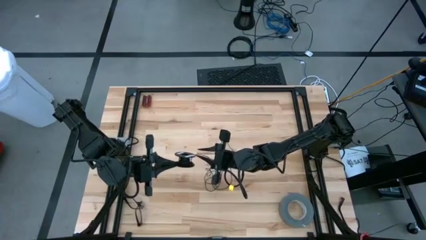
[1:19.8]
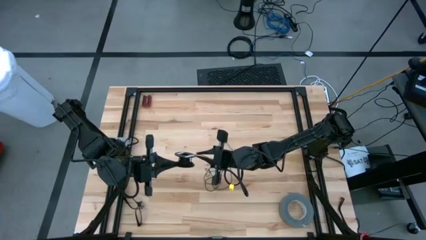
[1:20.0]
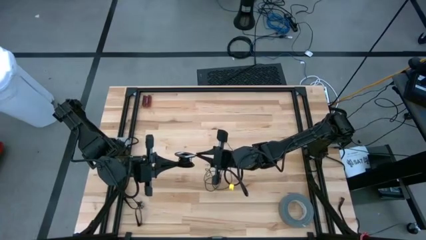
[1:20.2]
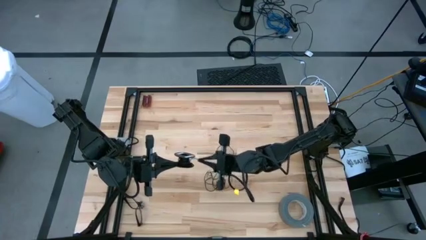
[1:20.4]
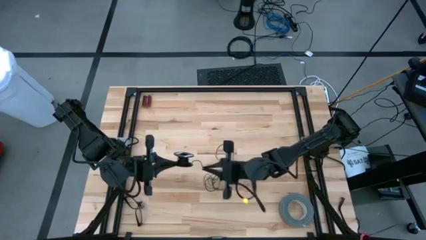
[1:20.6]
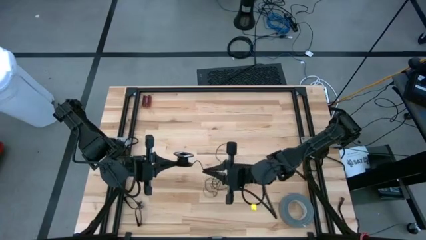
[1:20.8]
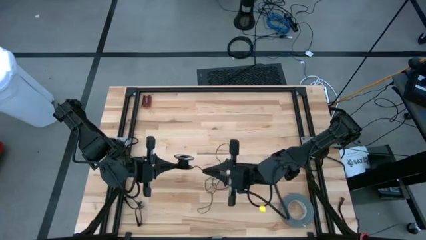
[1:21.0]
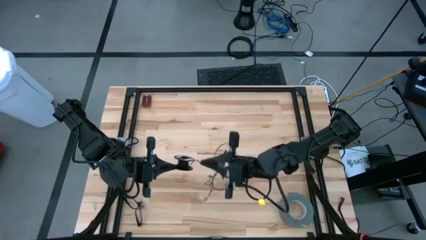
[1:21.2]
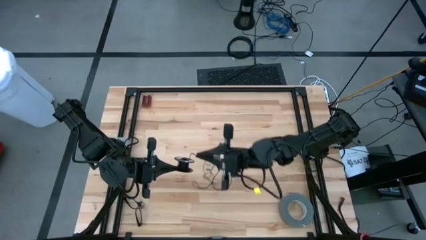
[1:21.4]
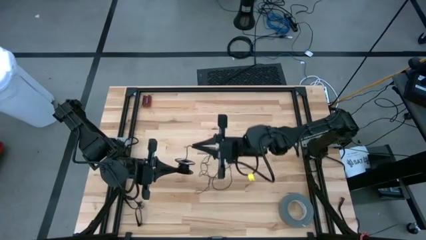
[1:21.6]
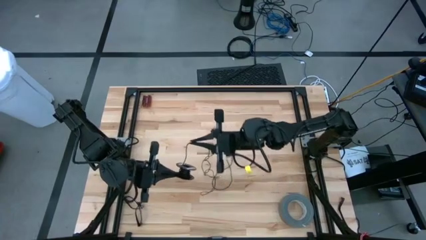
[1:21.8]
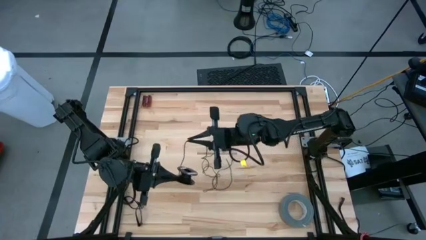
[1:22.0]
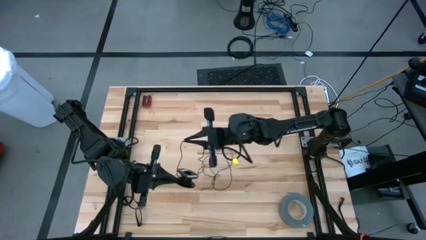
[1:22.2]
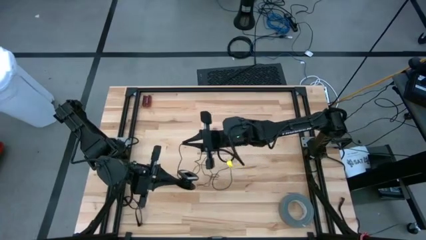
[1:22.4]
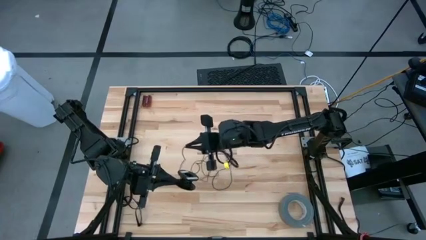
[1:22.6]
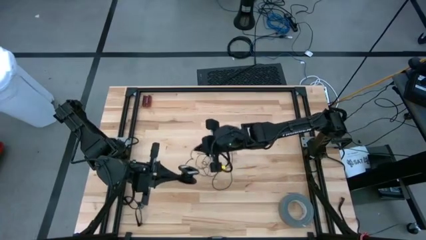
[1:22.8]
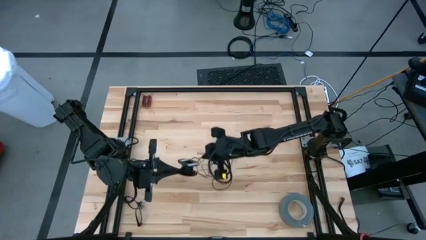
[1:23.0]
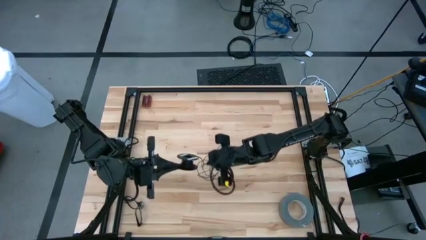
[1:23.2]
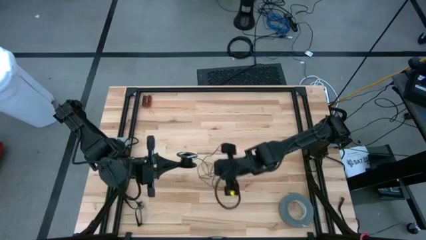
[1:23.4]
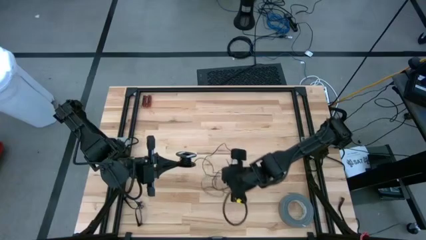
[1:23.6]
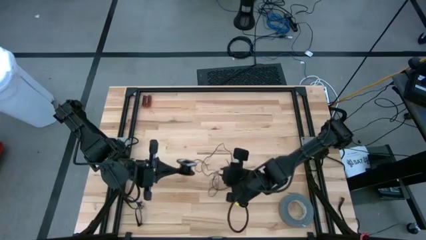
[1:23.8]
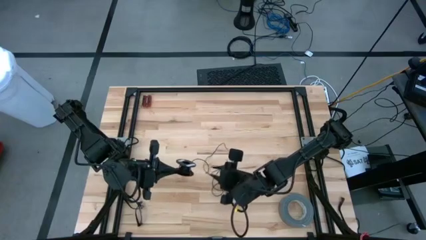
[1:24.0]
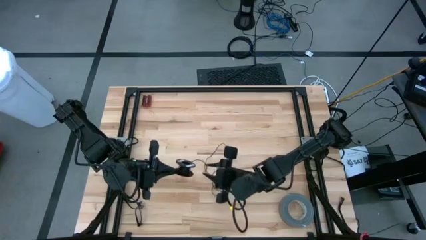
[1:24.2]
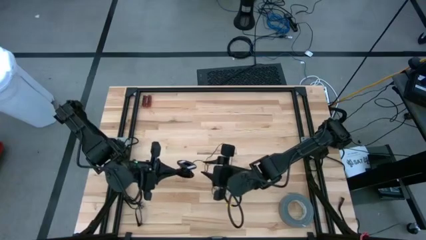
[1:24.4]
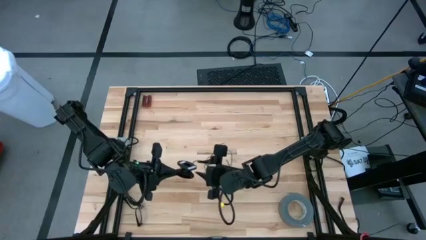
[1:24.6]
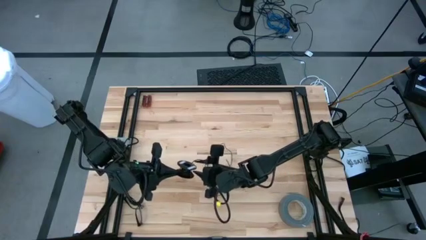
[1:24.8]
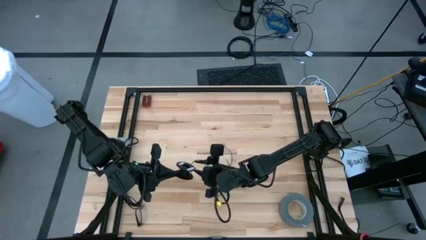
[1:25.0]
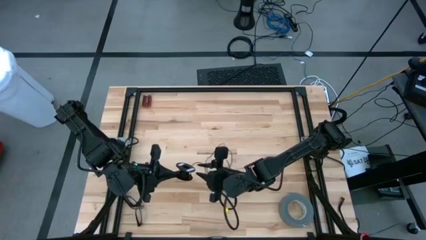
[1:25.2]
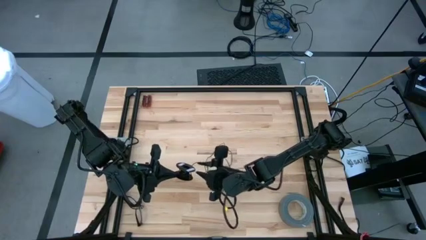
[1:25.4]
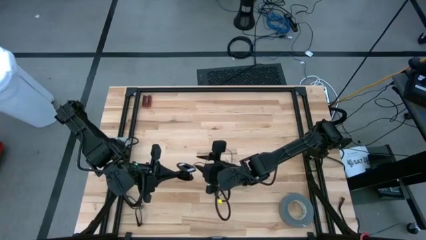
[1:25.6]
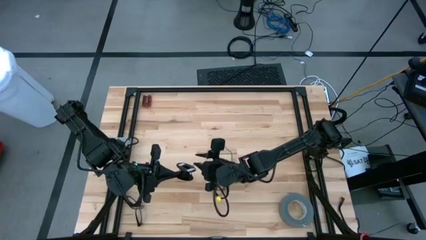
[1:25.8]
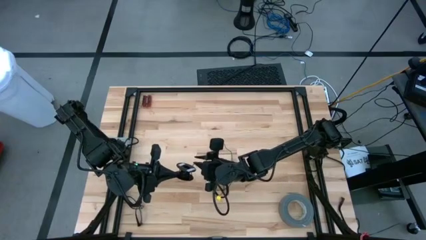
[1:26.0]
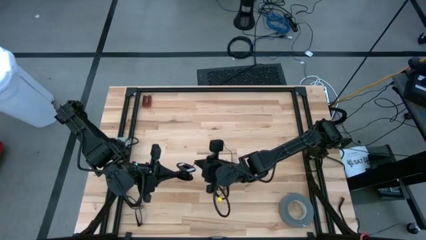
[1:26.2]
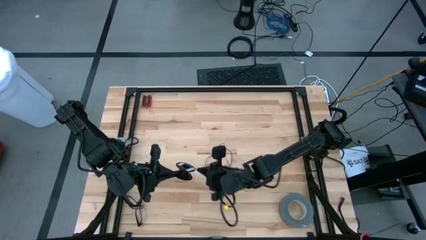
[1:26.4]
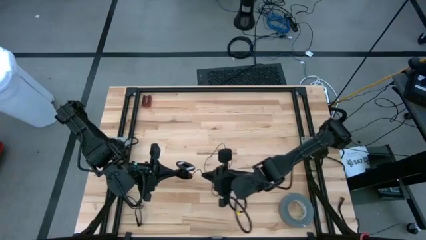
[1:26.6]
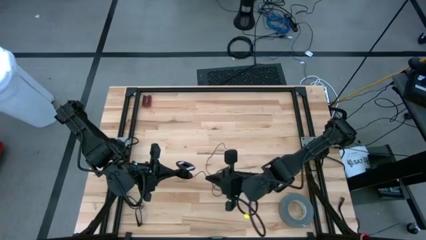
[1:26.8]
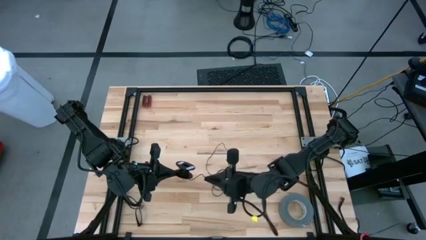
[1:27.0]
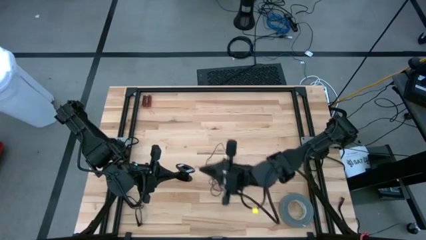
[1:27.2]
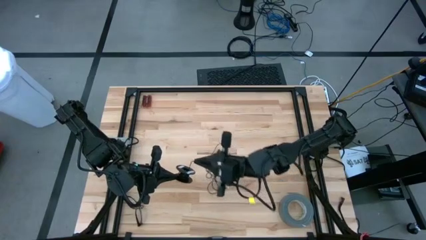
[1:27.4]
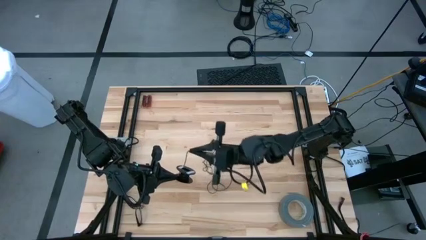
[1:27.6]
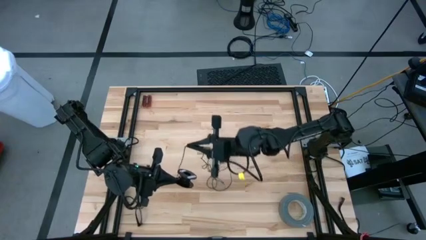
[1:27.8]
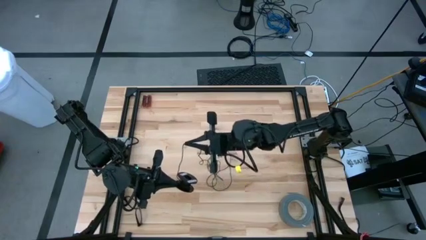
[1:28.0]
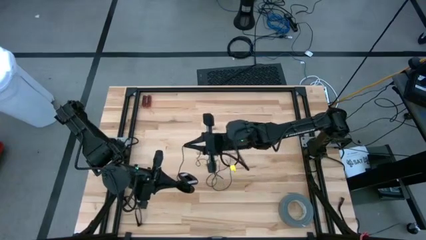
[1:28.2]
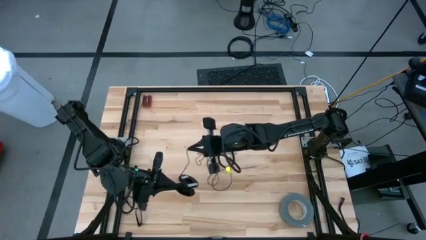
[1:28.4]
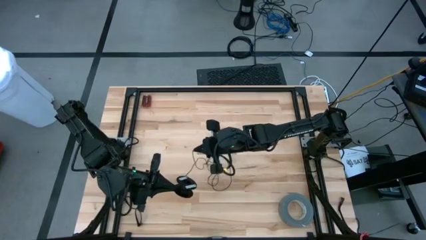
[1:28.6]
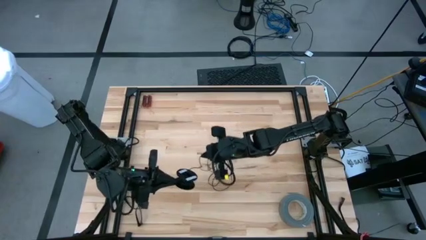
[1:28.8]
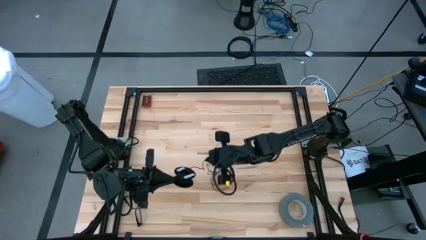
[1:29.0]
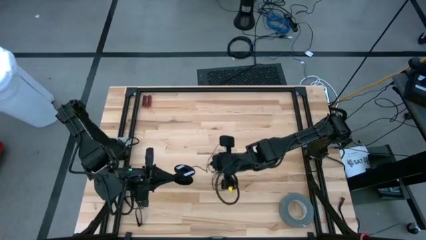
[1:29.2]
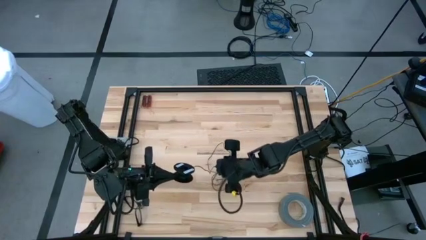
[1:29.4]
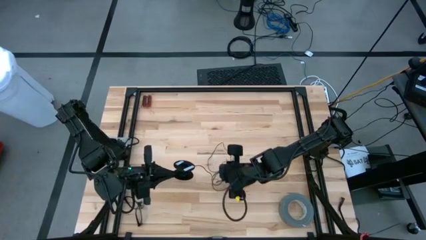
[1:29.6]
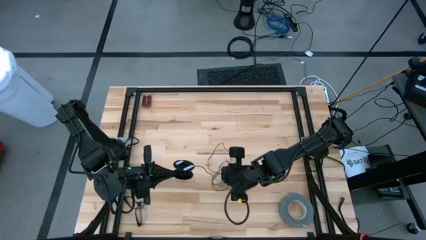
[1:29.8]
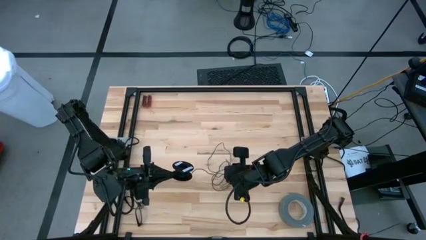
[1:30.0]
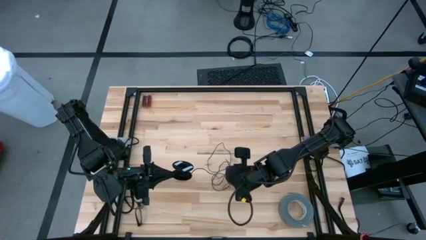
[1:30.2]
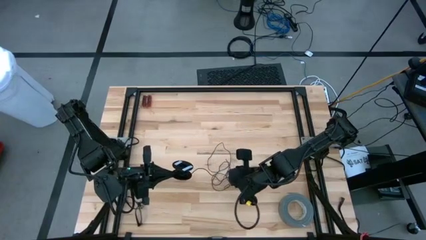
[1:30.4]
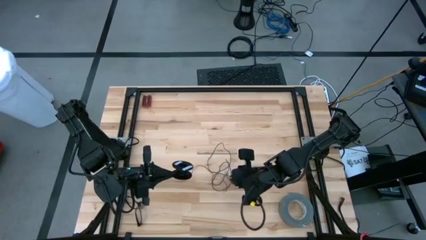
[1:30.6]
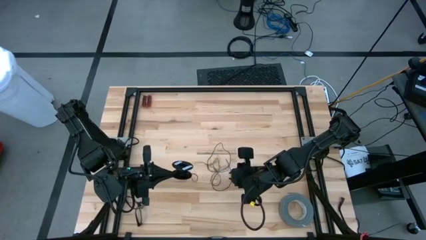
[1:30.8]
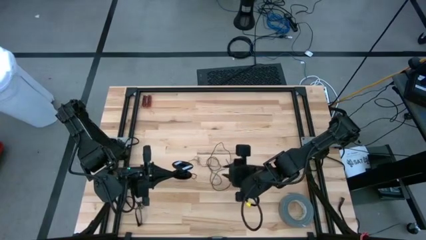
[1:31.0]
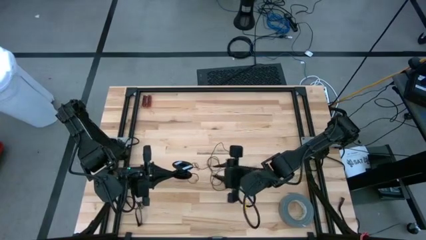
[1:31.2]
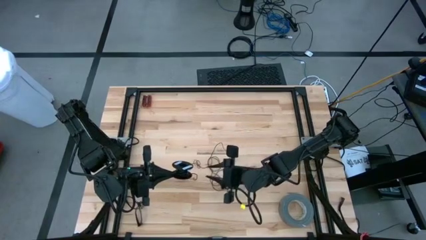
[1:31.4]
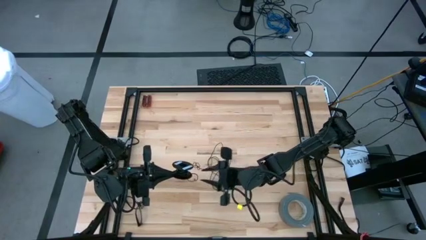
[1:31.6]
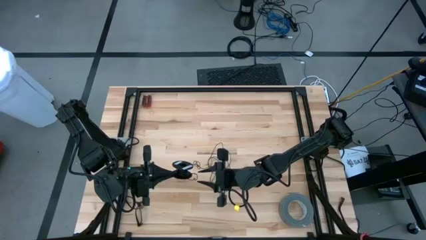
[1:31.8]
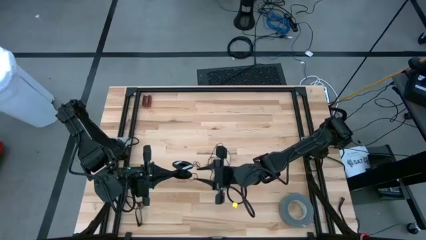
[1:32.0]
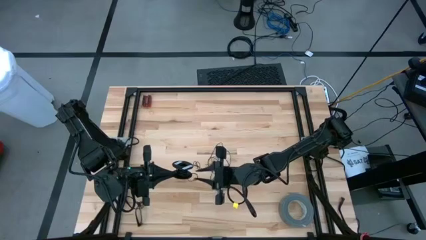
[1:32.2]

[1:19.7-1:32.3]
Task: Coil cords
Uncoil the black wire from the spool

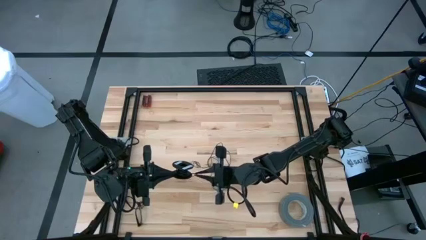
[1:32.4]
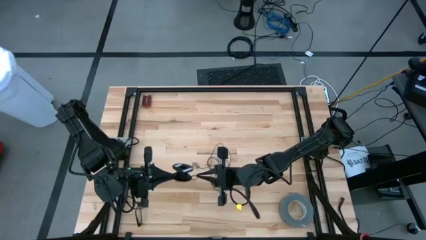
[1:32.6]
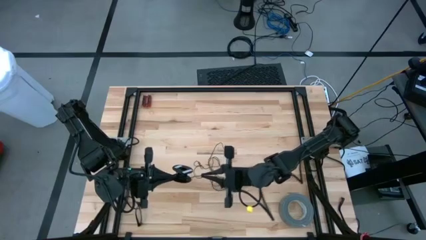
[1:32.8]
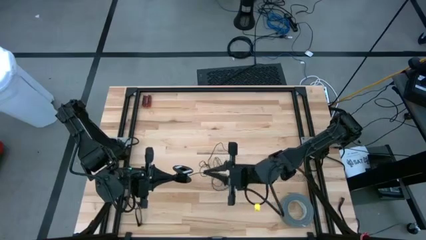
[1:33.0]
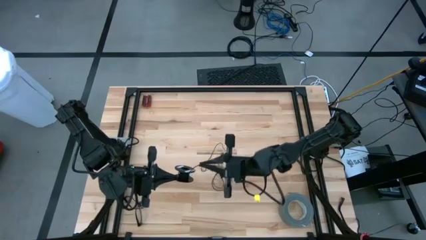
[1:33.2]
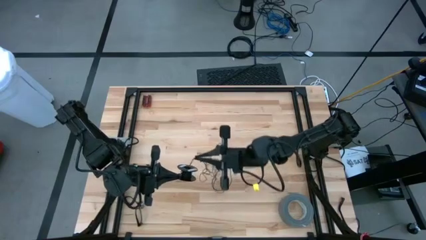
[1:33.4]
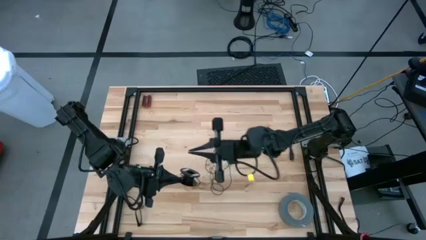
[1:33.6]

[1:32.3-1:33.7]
Uncoil the black wire from the spool

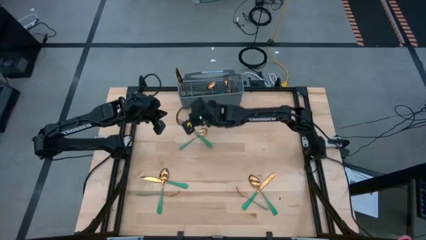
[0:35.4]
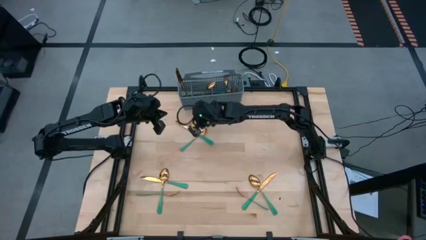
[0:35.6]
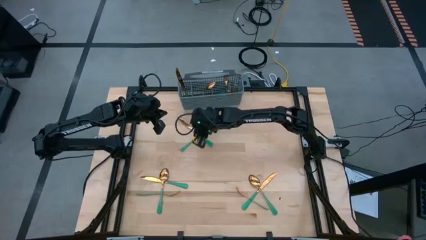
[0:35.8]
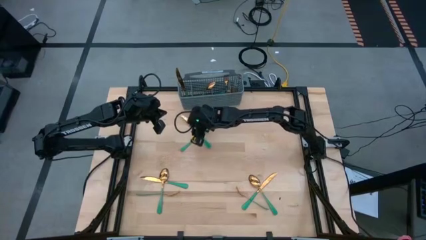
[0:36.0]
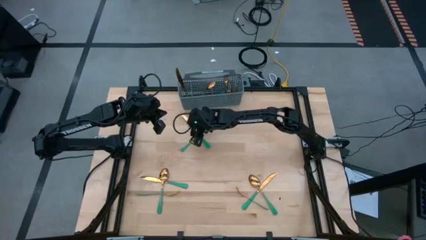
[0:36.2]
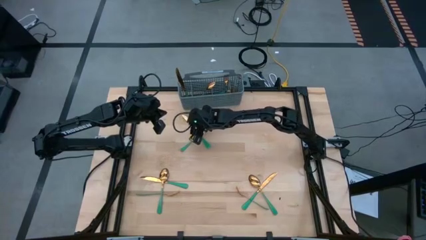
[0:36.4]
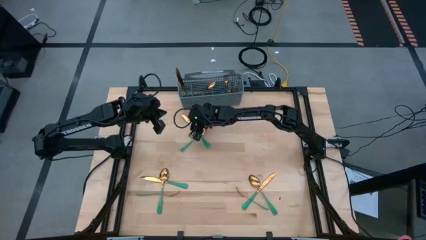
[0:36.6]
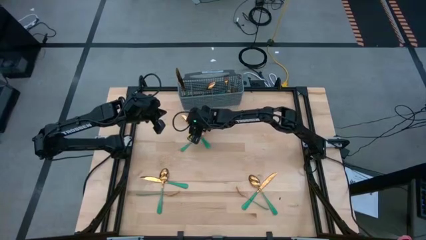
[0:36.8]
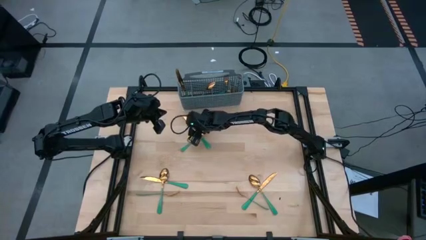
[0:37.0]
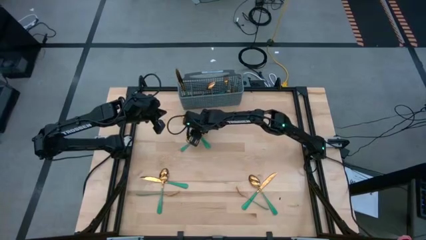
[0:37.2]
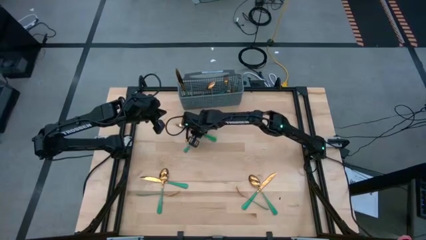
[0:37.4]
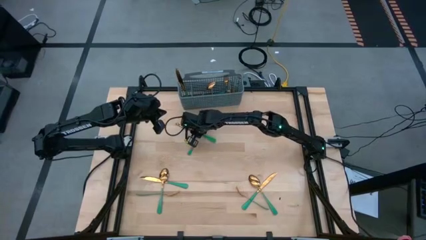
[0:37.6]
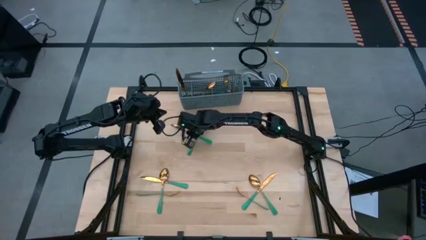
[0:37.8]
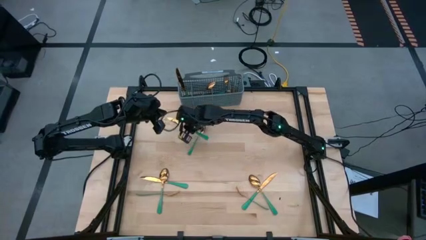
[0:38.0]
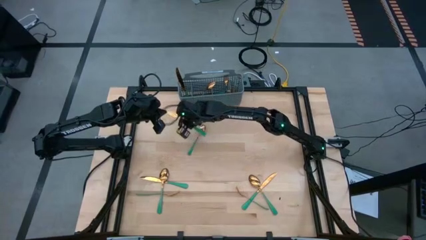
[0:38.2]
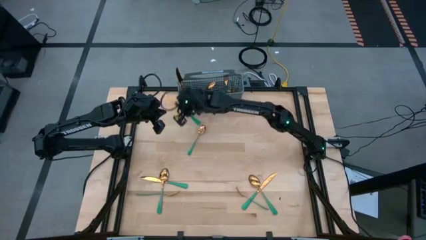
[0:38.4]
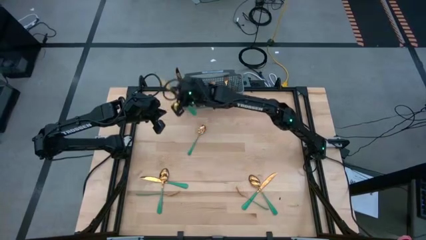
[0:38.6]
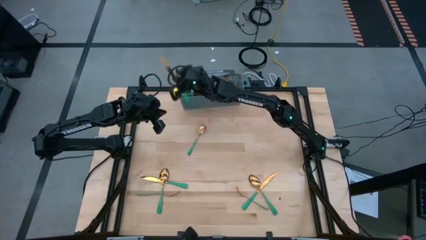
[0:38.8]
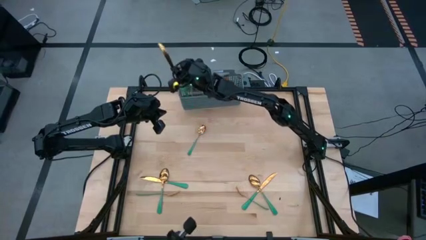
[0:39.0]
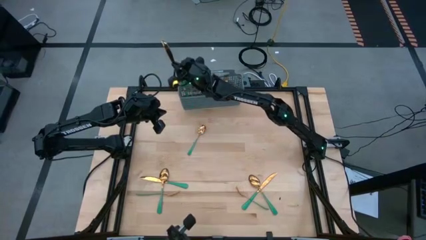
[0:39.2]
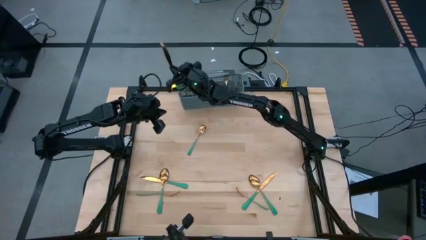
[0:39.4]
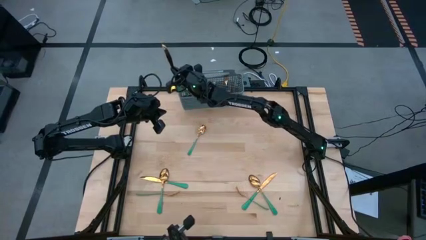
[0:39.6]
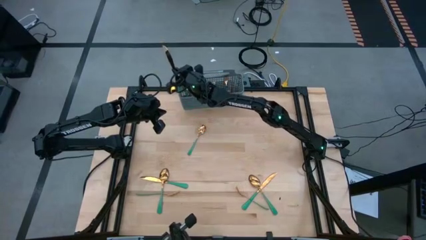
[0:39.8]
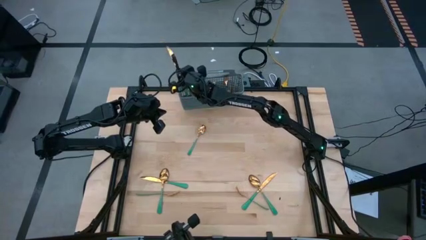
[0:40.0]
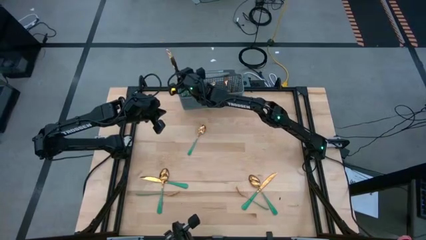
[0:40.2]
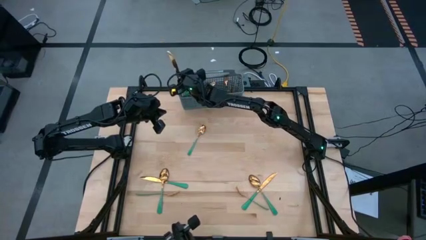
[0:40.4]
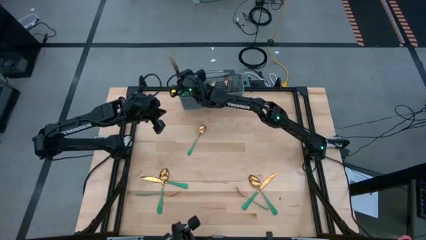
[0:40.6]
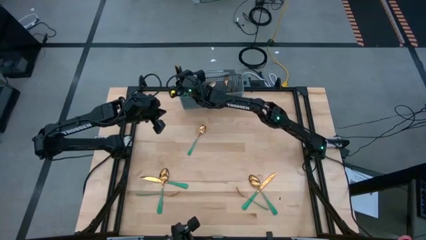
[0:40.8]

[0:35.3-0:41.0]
Task: Sort silverware
Put the green knife into the gray bin
